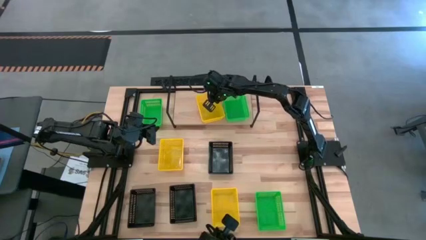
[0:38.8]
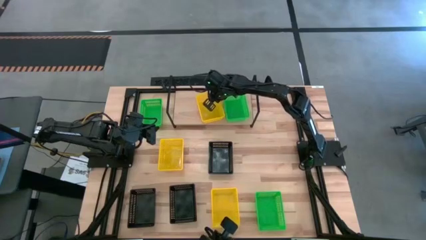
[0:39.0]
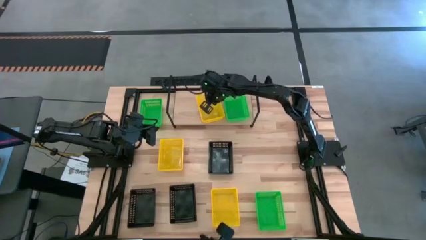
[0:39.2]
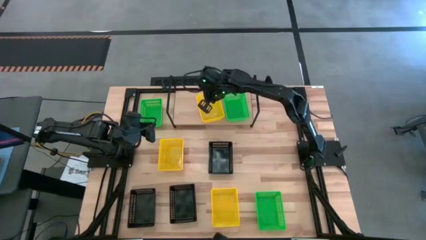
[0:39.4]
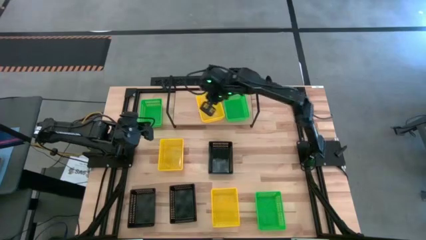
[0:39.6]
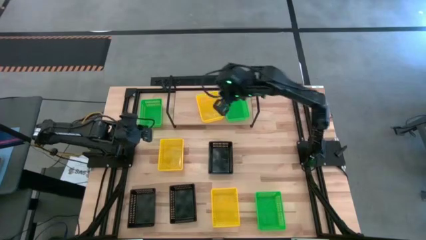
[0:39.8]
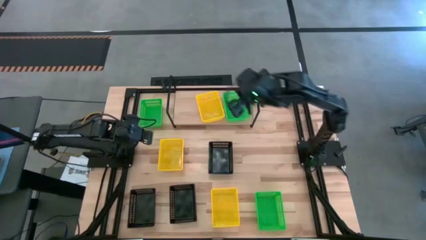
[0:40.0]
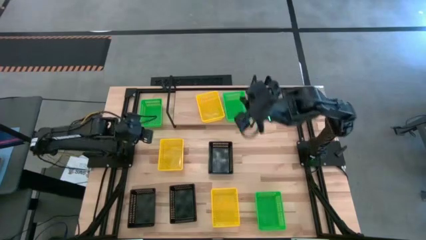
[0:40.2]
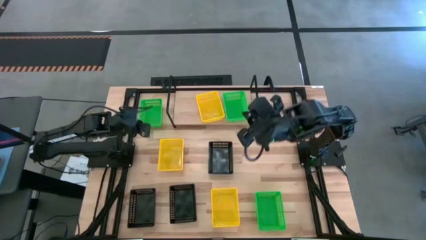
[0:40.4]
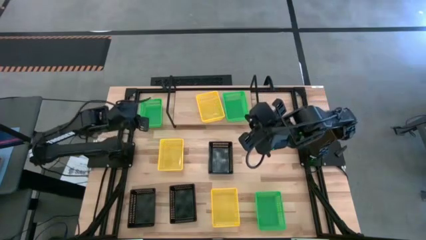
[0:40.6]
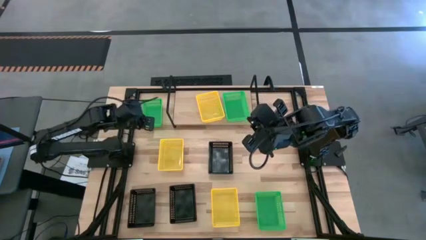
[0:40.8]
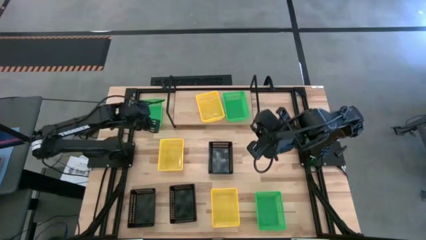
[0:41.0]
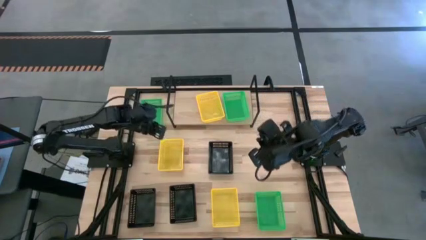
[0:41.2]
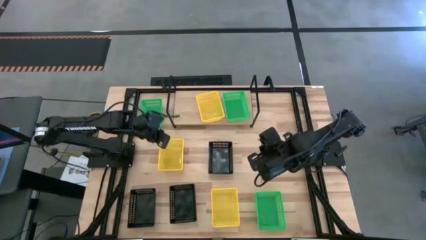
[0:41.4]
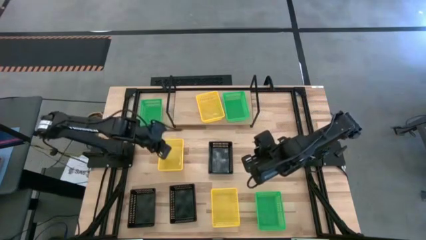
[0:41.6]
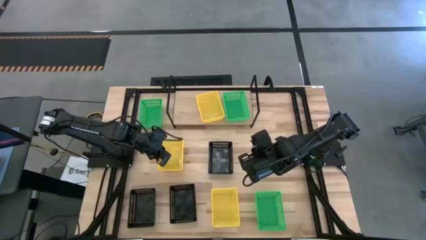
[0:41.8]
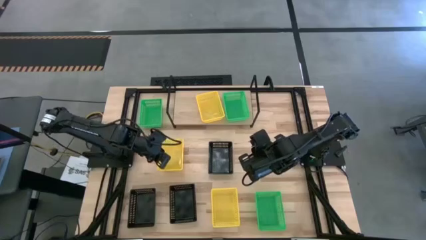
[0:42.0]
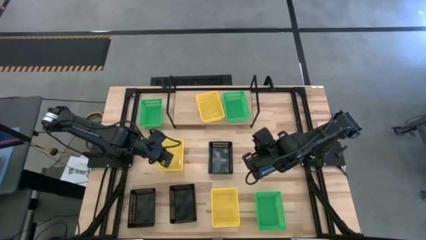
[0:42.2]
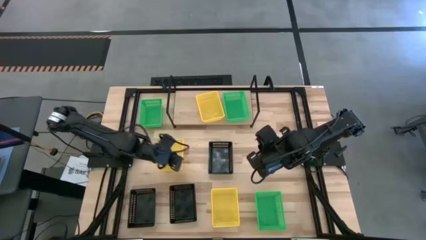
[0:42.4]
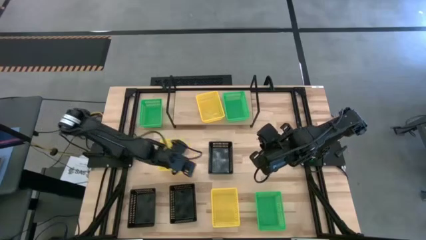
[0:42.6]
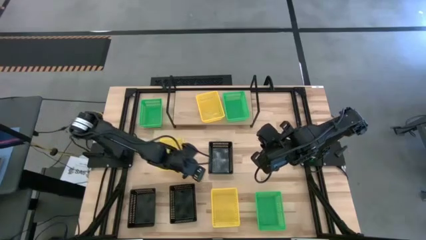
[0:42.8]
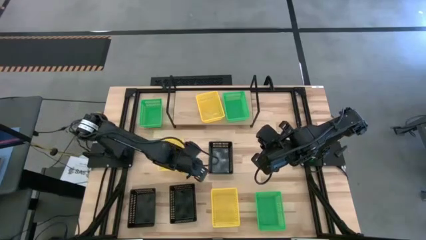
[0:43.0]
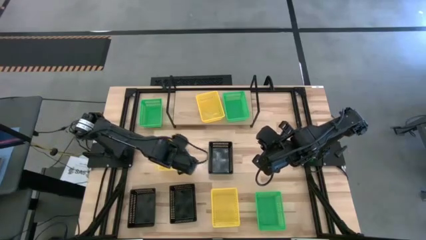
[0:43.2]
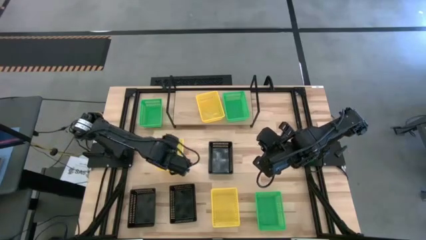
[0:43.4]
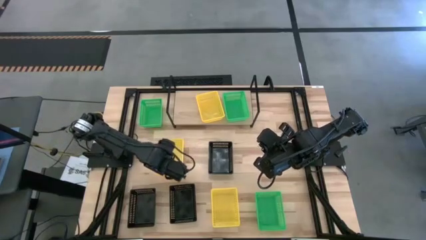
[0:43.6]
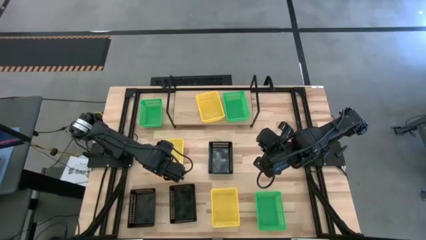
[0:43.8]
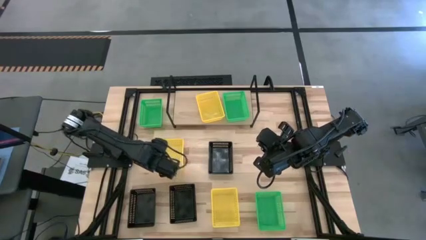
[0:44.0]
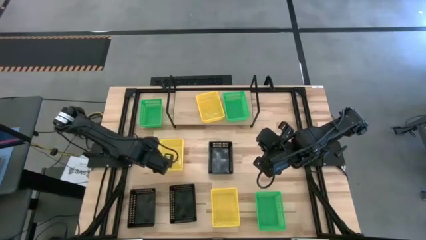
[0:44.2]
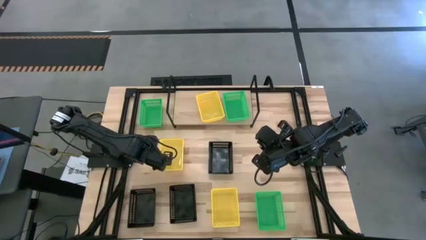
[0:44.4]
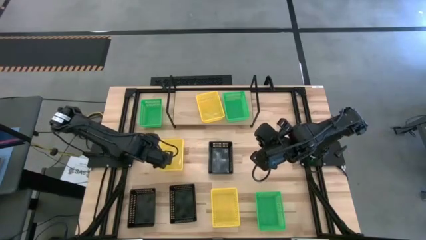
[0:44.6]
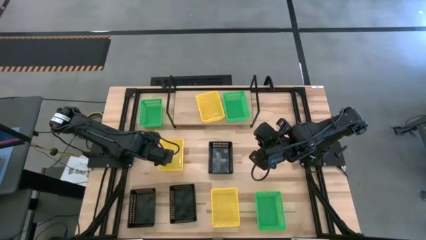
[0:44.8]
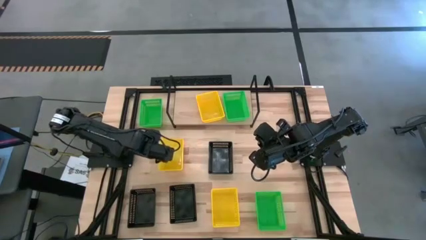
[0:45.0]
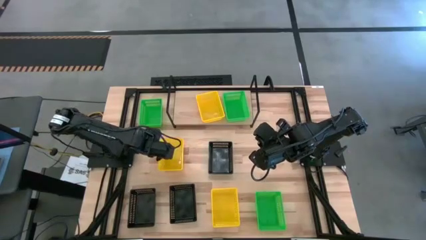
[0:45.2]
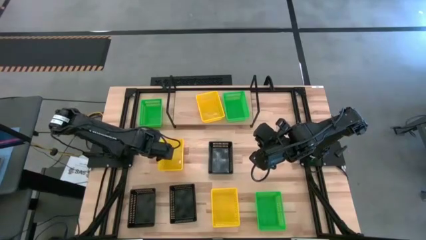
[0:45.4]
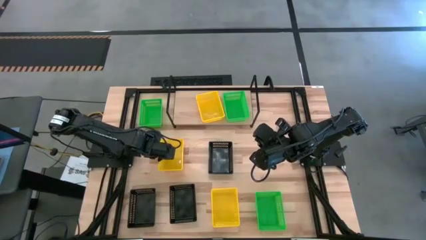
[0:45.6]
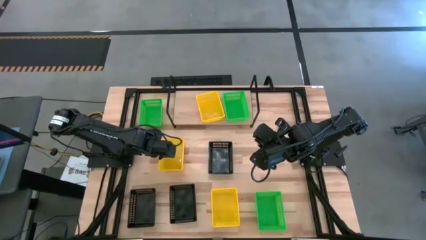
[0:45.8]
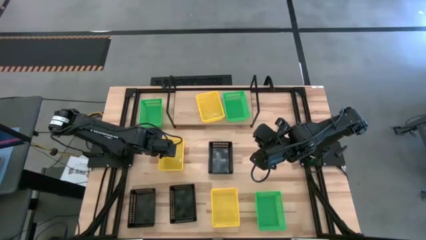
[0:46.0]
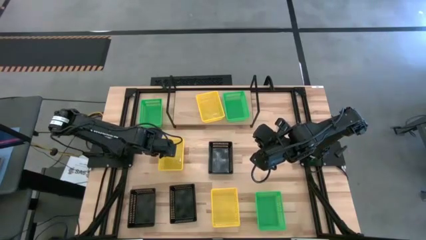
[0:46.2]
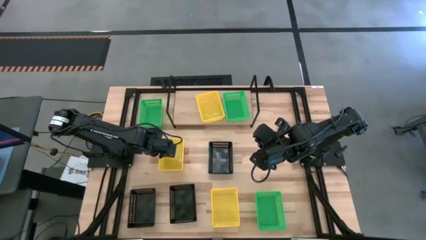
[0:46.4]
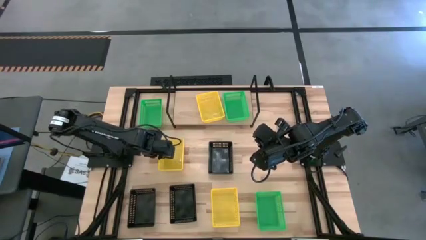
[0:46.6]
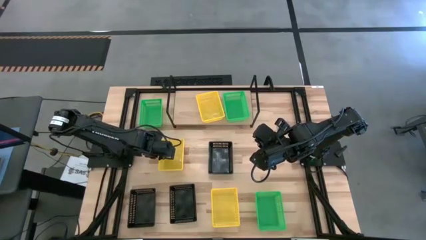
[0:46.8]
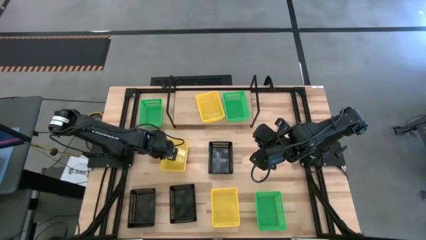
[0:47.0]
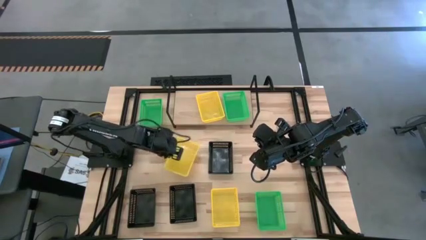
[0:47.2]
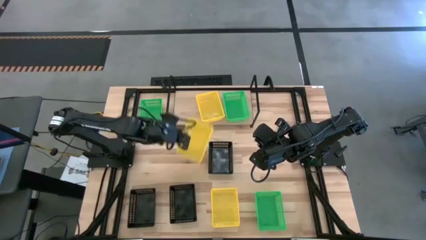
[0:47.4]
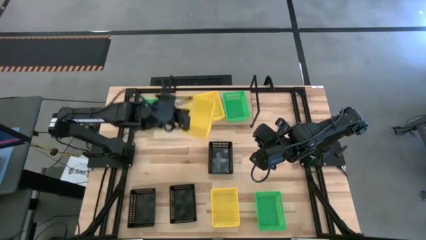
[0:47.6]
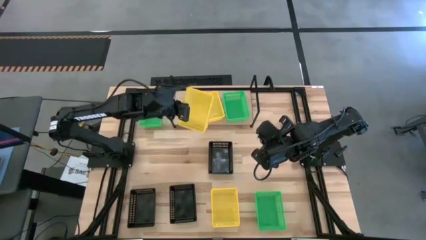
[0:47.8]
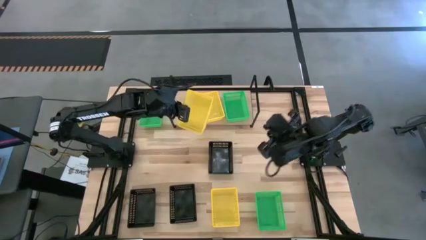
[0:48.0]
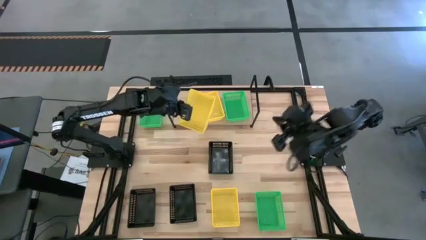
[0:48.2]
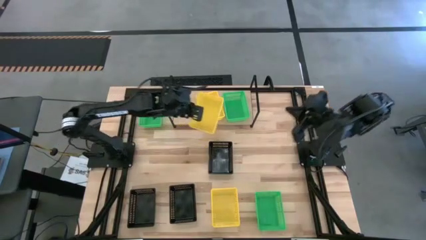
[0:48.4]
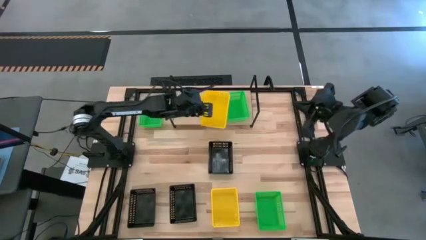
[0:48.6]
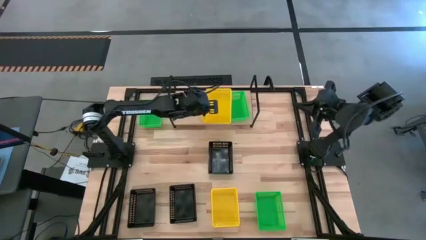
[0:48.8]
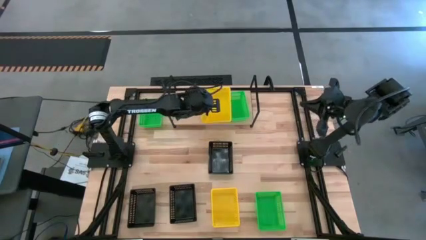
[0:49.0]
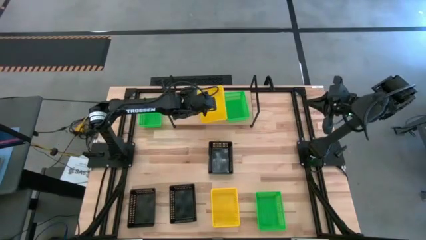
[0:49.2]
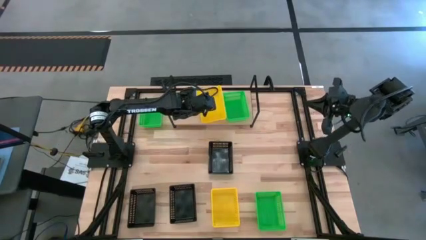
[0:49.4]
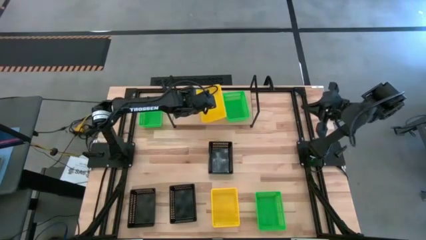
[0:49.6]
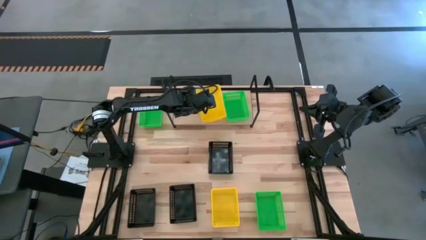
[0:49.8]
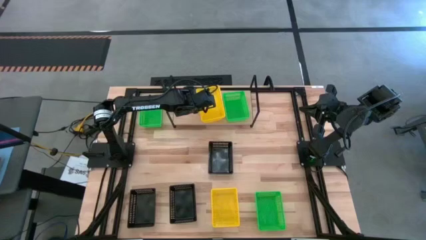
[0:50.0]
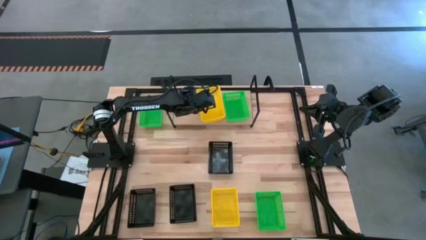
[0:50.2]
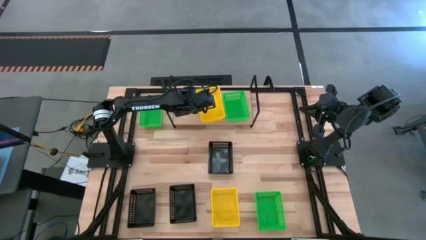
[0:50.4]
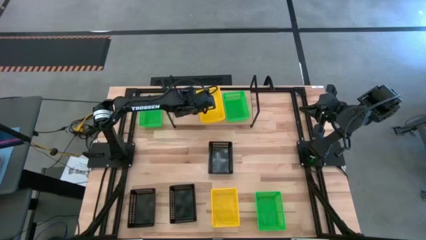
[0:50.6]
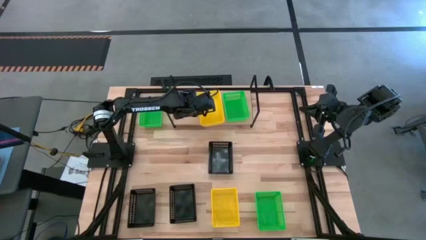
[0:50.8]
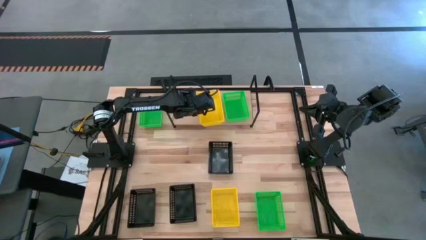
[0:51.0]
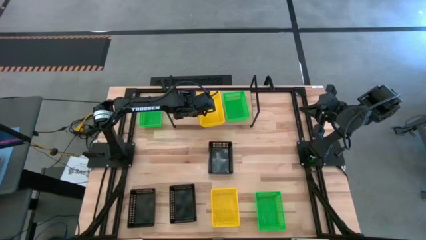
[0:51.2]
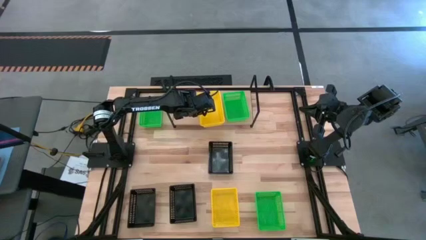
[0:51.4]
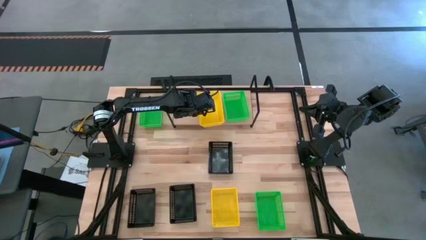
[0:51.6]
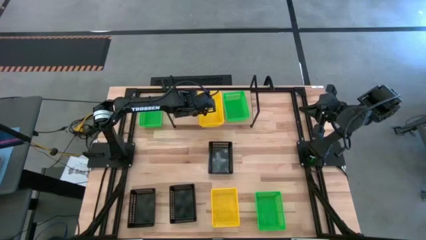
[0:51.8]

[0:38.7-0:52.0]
Task: Stack baskets on shelf by color
Stack the top yellow bin on top of the yellow bin on the shelf
